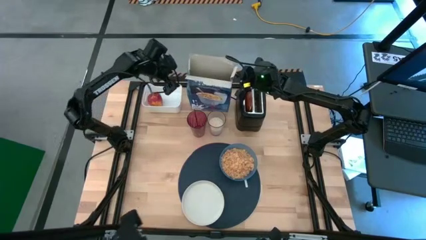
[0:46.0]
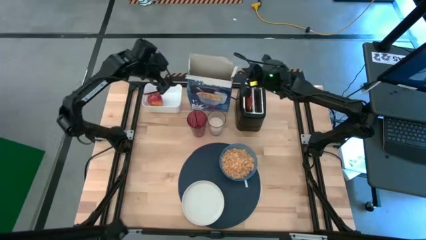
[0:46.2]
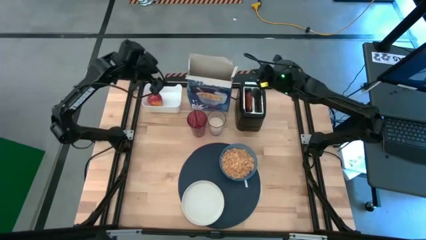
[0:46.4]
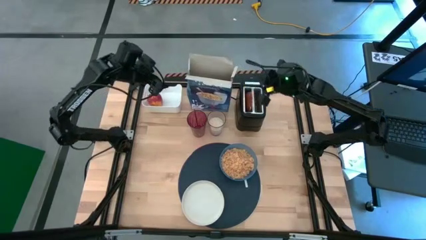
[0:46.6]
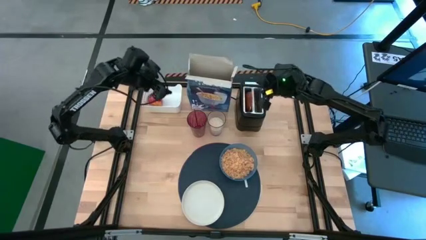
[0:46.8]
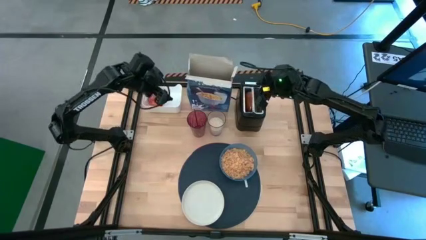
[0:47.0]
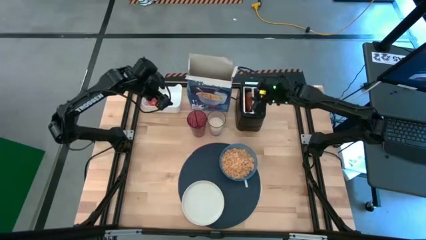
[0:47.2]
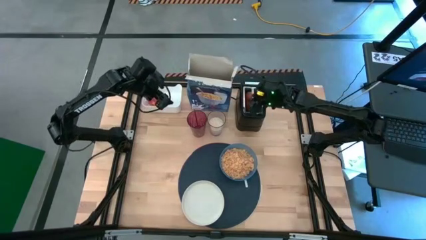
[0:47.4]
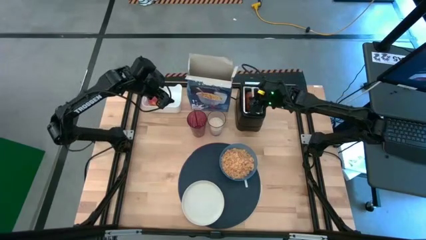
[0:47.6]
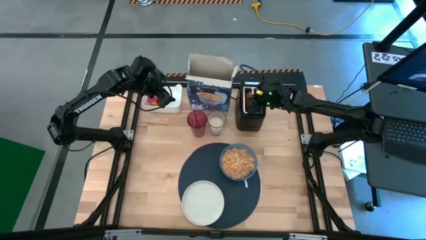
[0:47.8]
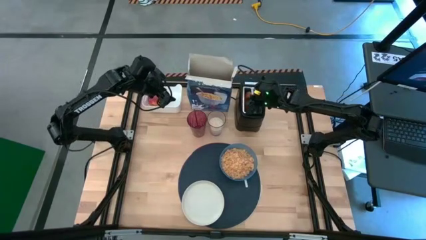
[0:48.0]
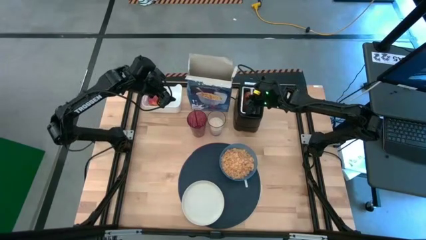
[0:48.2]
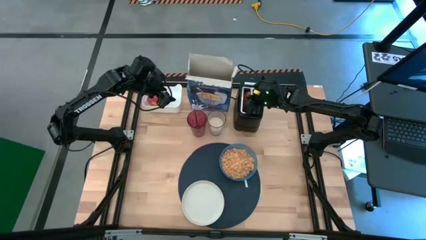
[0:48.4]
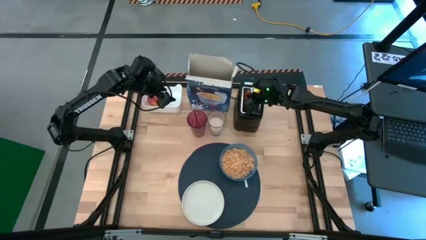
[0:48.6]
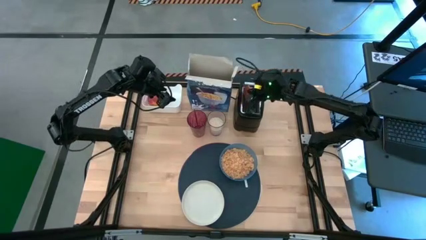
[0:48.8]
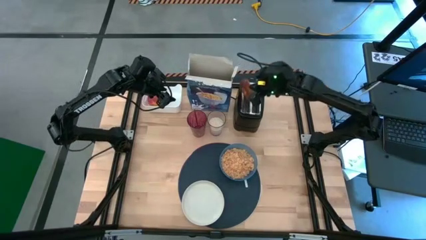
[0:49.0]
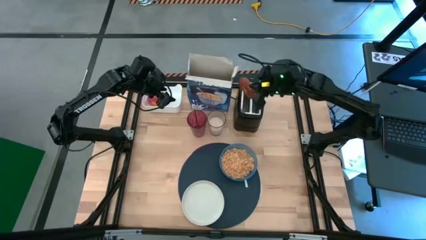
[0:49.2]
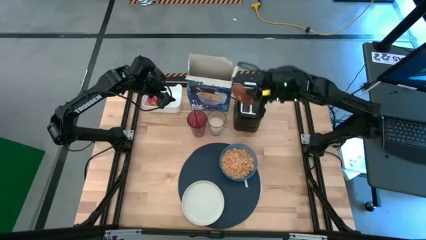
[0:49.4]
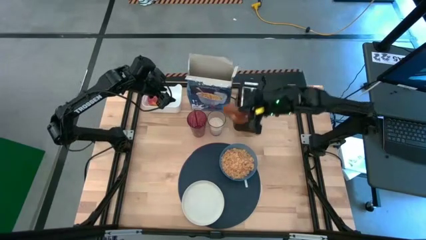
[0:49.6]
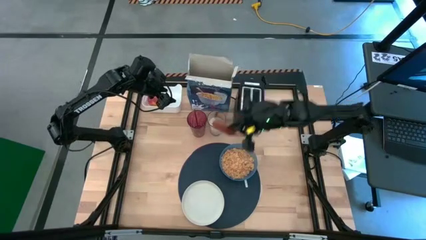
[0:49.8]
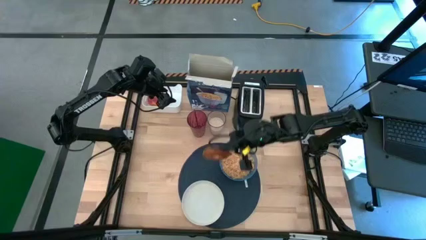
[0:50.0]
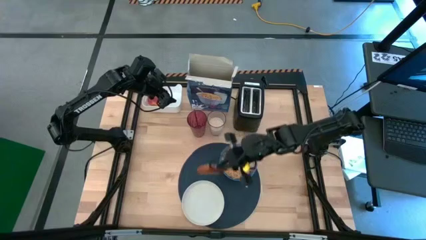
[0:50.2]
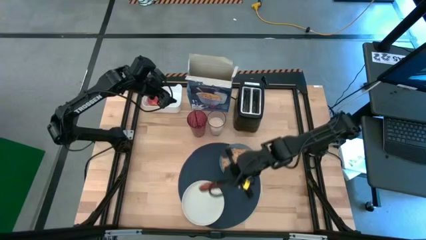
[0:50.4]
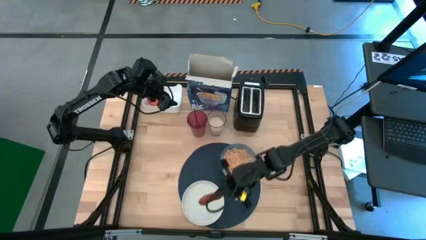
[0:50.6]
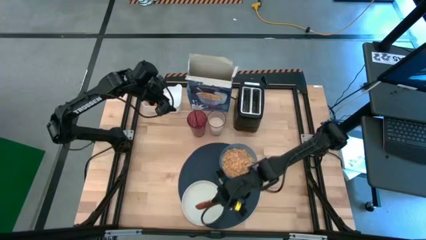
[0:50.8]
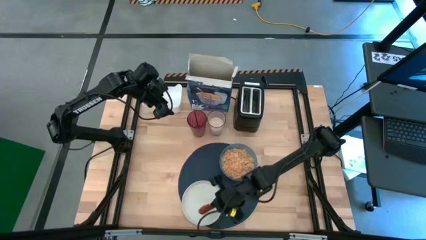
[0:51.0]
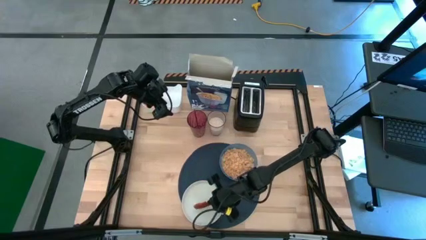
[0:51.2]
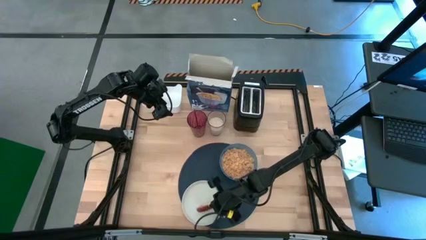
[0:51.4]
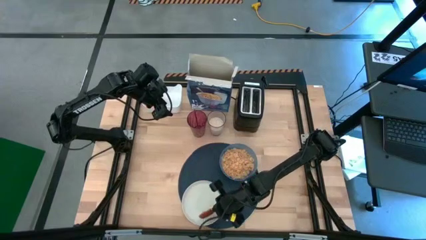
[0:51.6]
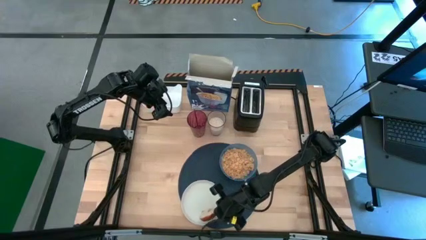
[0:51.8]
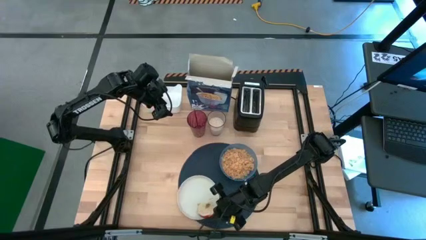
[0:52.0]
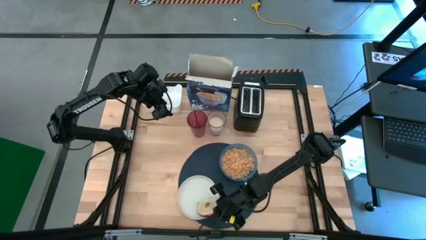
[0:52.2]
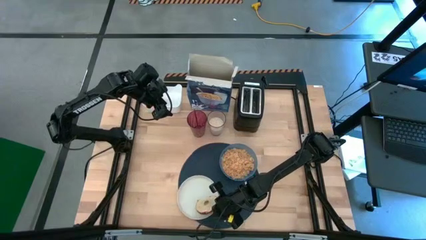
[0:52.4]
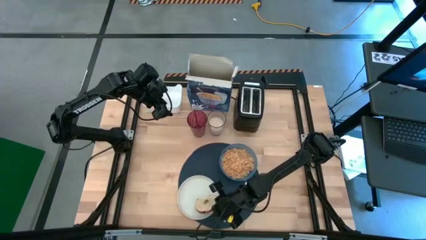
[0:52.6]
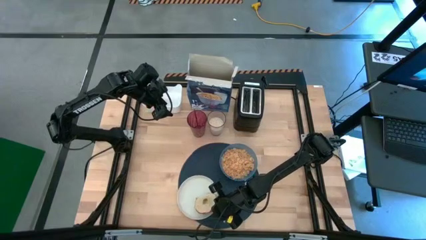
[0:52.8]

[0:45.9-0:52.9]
Task: Arrange a breakfast setting
Put the bagel on the white plate

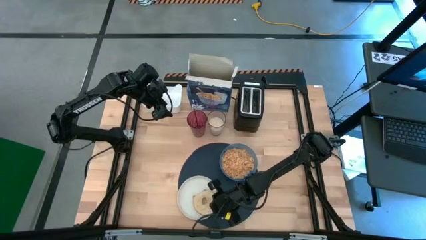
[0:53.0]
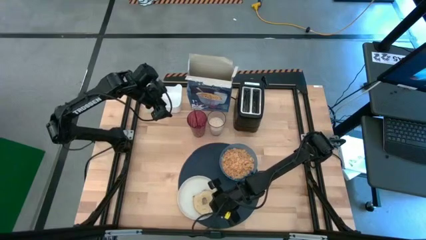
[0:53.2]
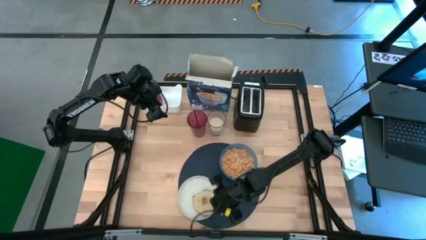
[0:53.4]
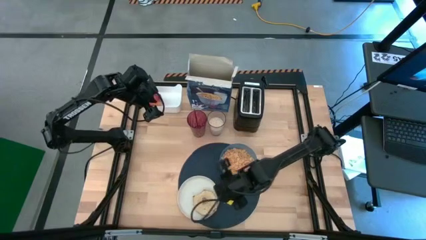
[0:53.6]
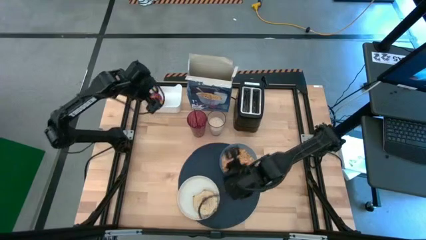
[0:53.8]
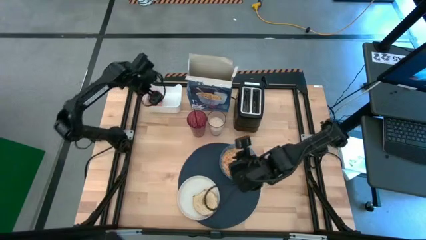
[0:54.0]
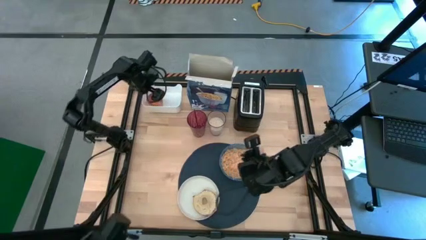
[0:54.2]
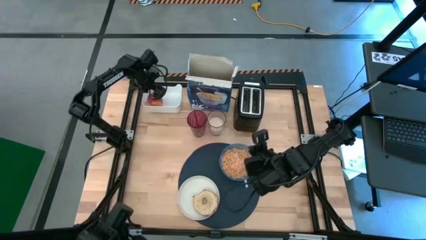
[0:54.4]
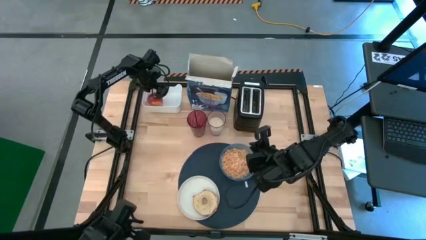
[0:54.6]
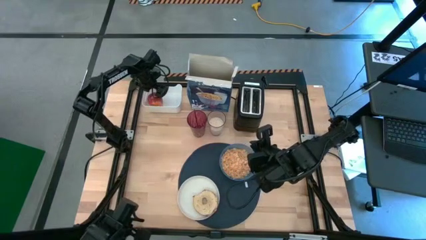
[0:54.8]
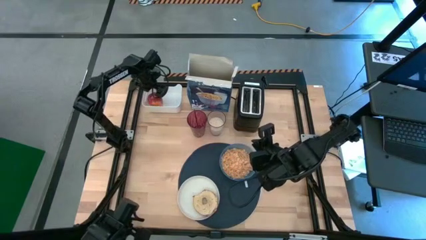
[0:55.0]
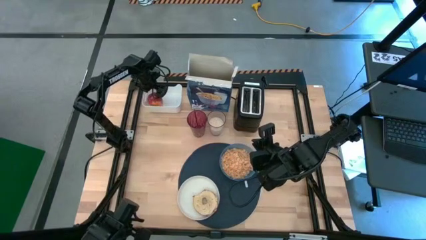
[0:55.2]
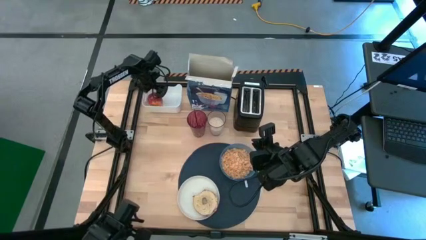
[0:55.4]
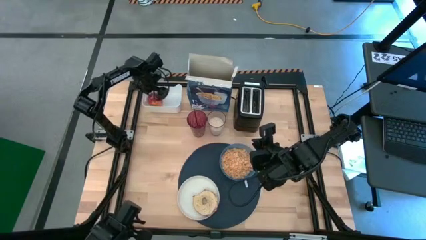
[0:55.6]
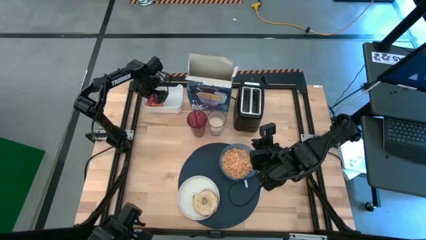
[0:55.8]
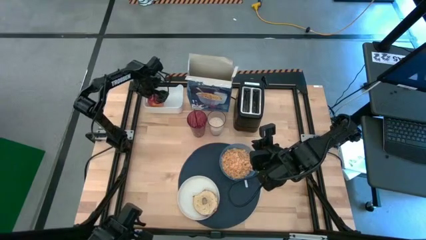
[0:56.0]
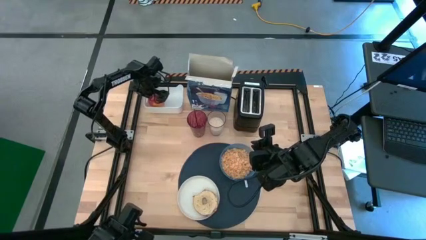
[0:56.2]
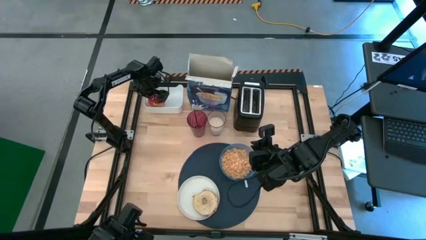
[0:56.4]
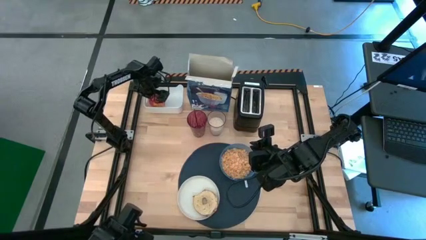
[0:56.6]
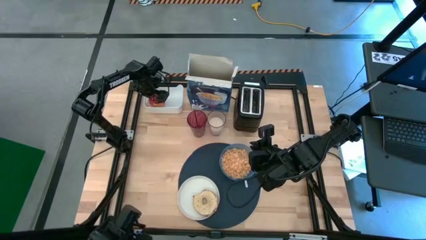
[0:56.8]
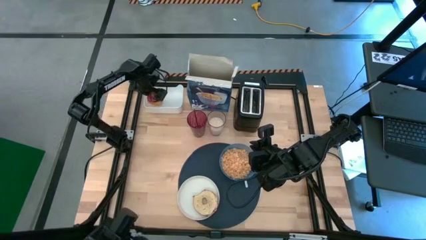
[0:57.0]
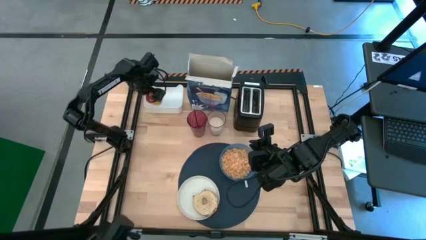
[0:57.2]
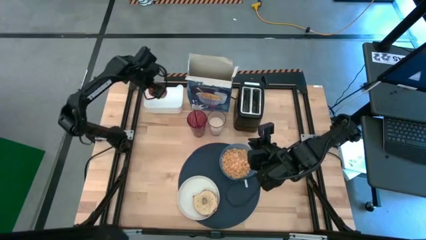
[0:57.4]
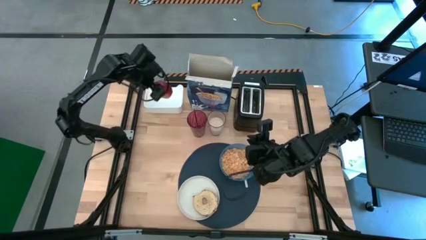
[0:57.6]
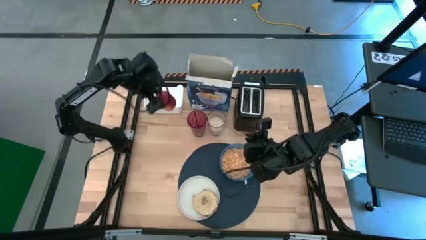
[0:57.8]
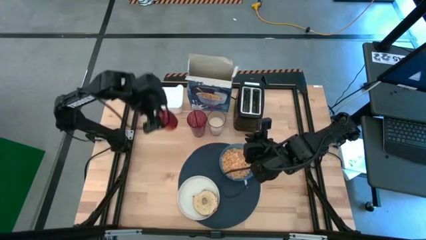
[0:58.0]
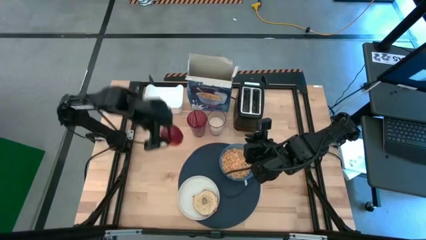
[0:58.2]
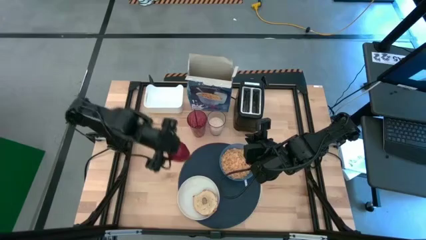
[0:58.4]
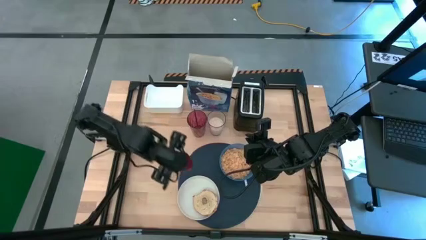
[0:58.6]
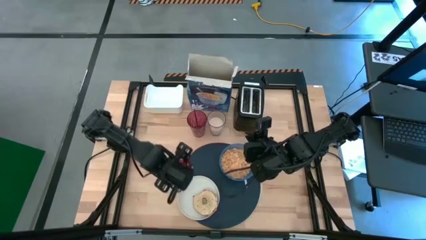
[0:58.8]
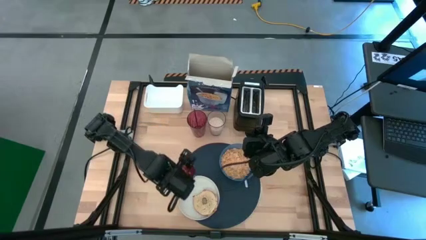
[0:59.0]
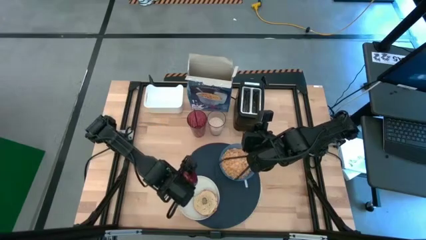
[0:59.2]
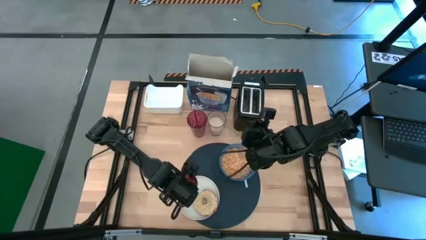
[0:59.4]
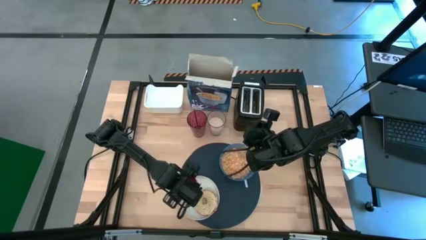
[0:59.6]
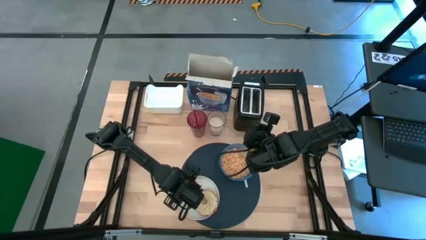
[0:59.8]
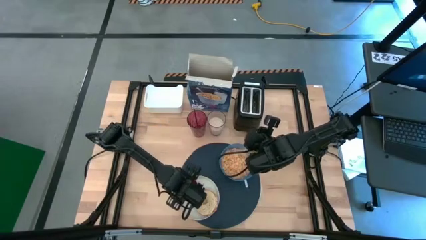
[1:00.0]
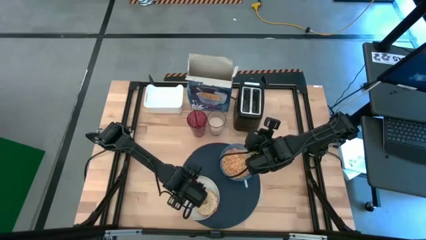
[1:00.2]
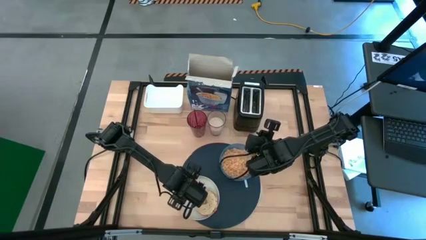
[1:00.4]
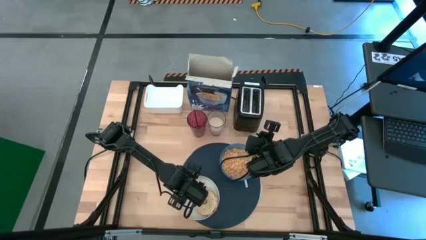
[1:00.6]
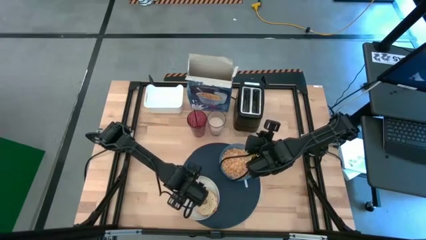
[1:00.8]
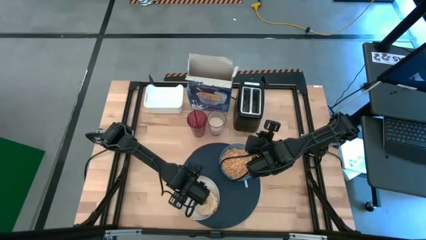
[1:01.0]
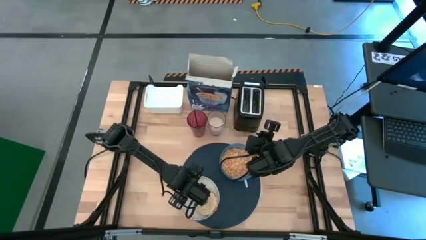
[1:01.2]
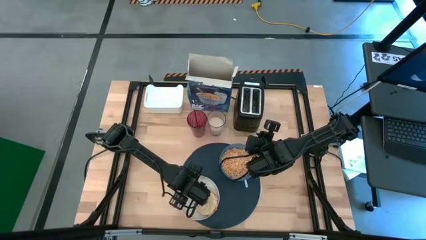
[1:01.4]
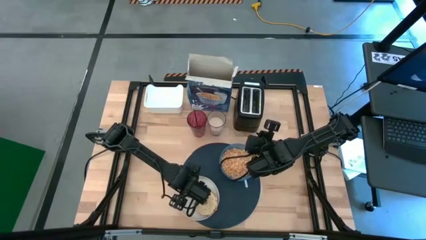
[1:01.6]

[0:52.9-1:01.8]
Put the apple on the white plate
